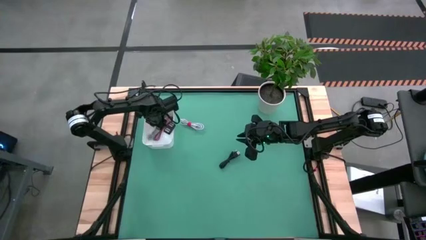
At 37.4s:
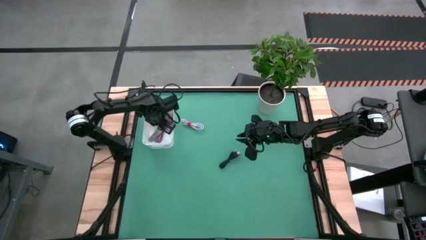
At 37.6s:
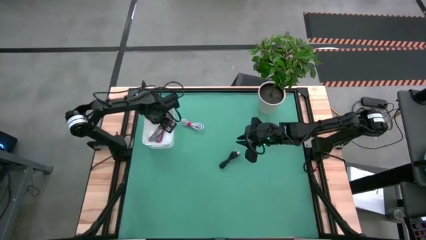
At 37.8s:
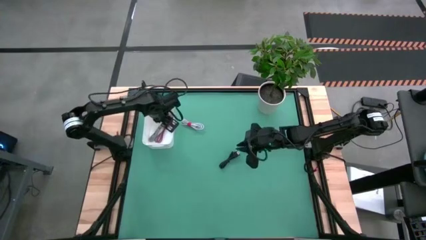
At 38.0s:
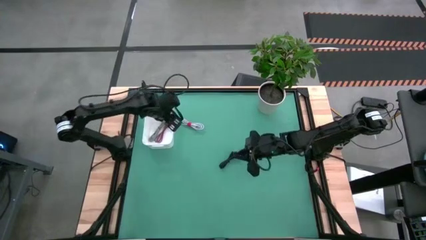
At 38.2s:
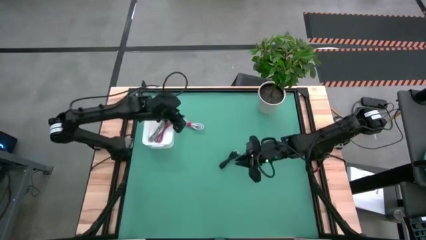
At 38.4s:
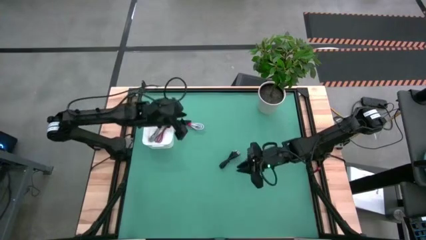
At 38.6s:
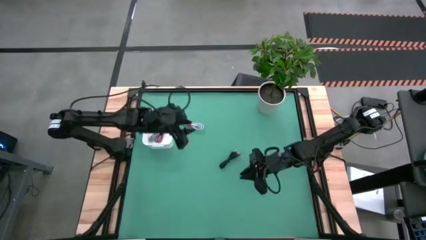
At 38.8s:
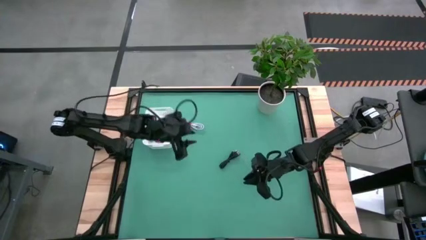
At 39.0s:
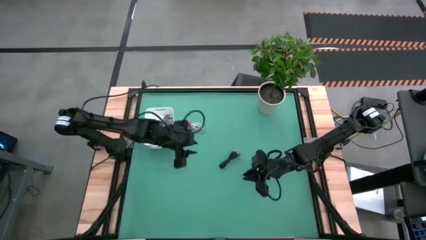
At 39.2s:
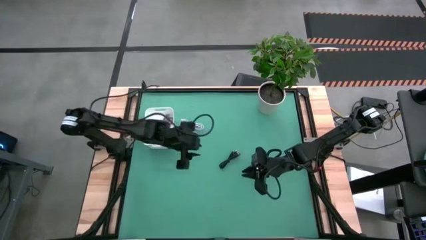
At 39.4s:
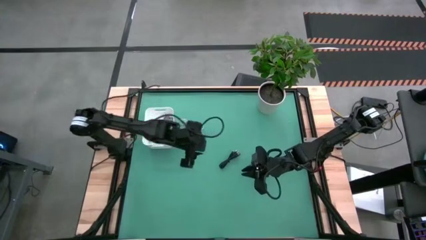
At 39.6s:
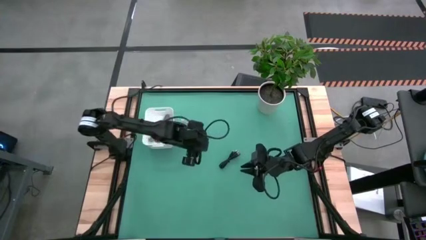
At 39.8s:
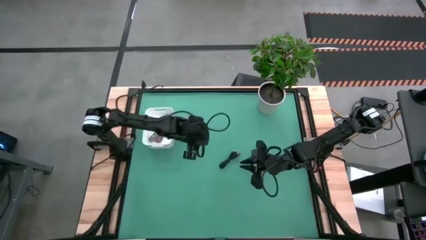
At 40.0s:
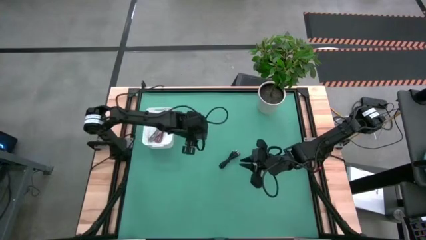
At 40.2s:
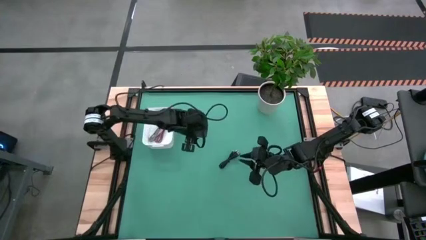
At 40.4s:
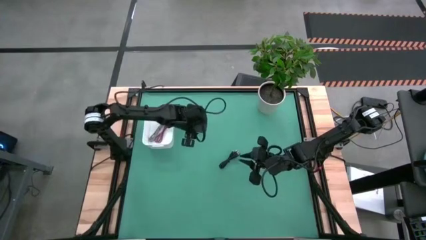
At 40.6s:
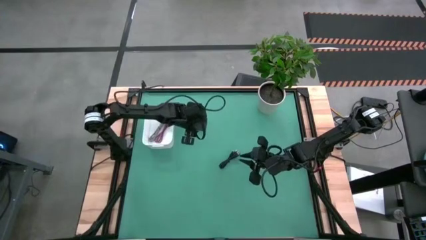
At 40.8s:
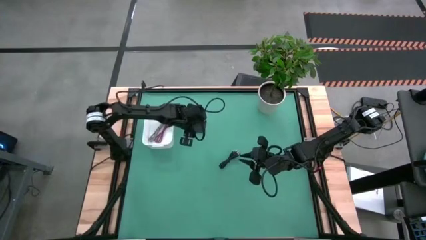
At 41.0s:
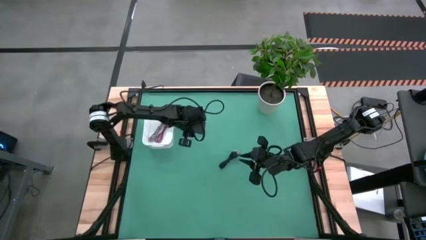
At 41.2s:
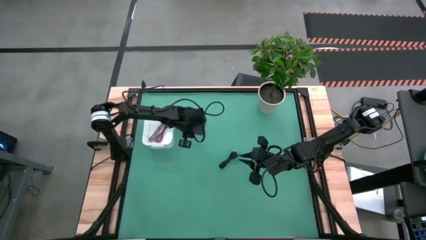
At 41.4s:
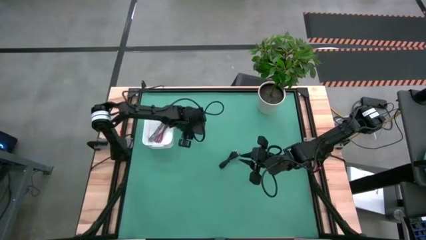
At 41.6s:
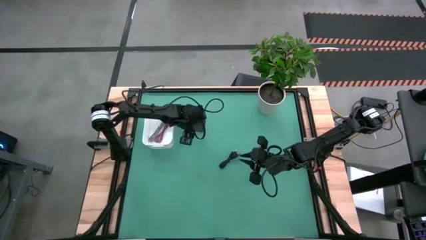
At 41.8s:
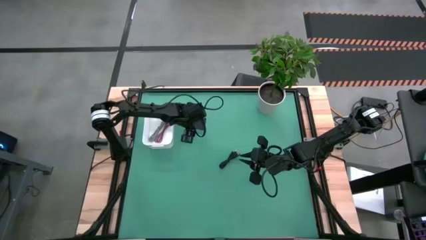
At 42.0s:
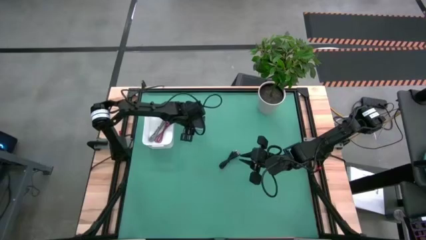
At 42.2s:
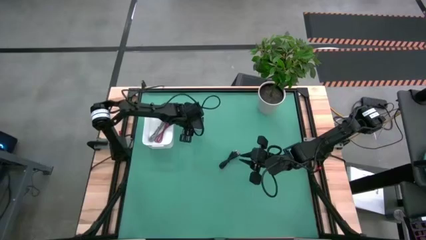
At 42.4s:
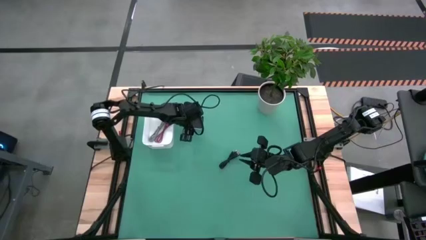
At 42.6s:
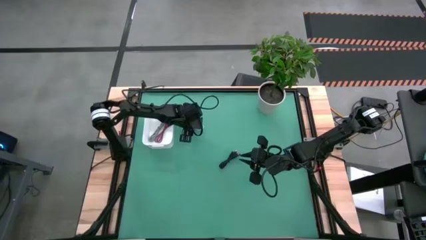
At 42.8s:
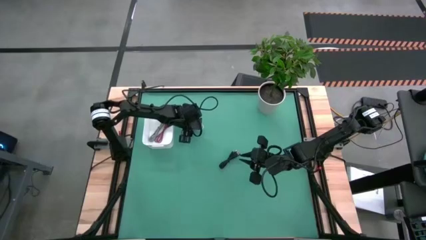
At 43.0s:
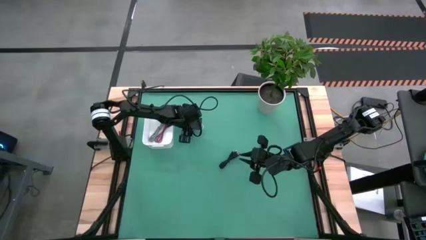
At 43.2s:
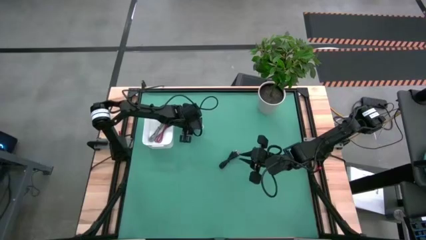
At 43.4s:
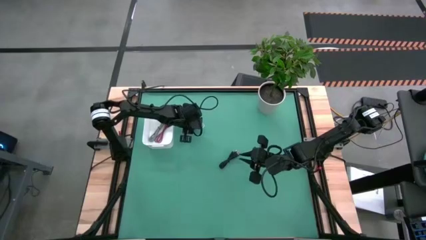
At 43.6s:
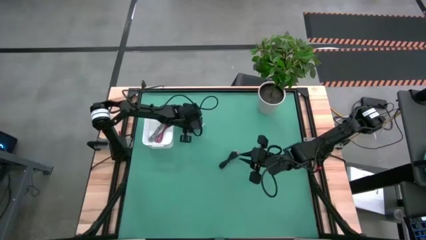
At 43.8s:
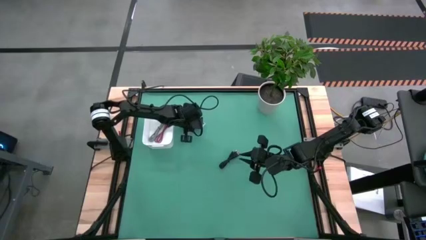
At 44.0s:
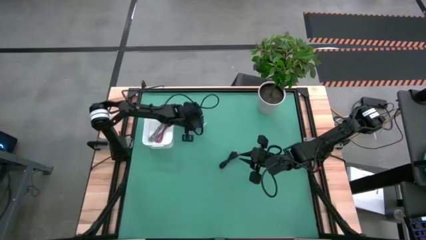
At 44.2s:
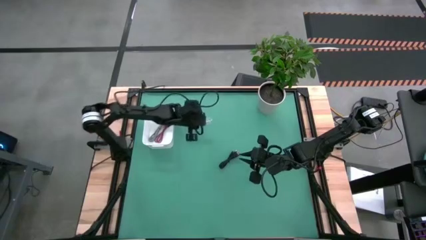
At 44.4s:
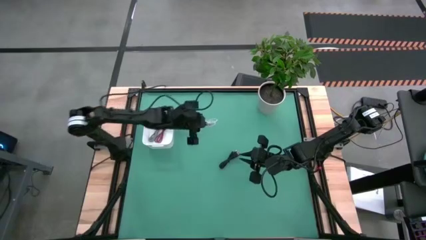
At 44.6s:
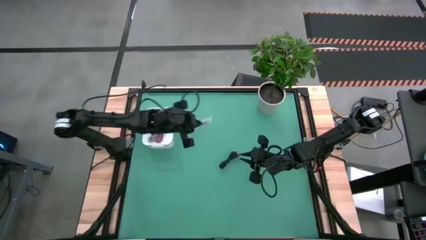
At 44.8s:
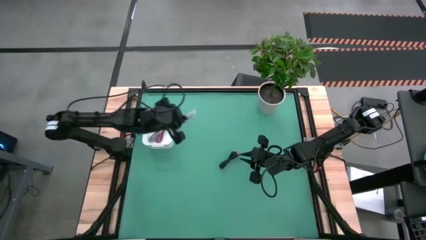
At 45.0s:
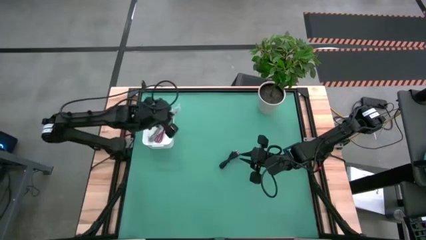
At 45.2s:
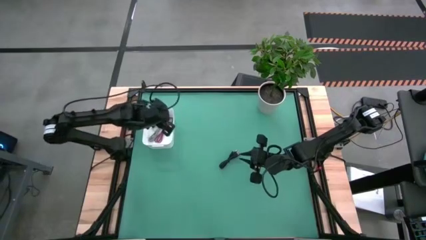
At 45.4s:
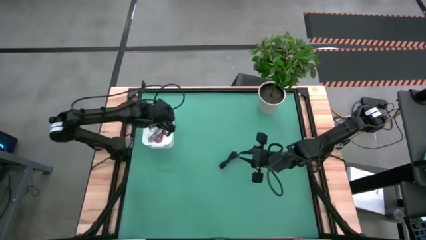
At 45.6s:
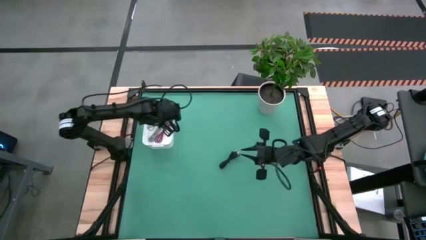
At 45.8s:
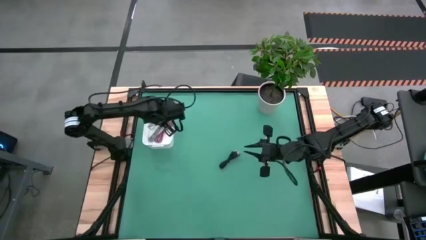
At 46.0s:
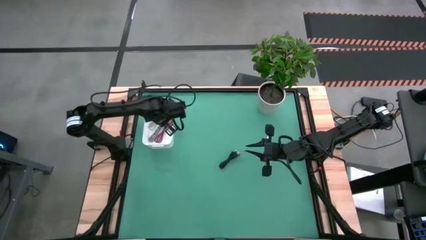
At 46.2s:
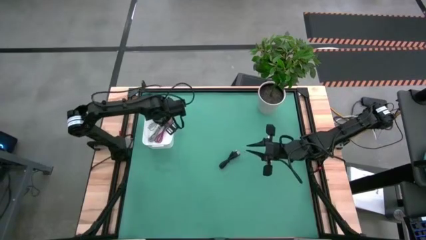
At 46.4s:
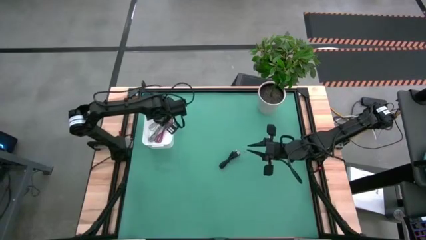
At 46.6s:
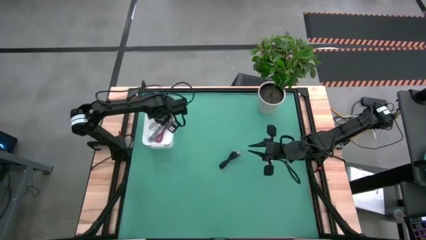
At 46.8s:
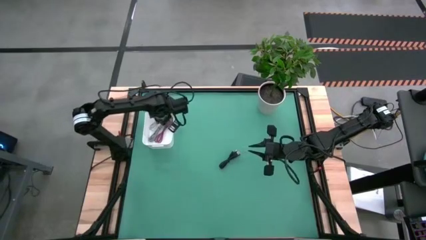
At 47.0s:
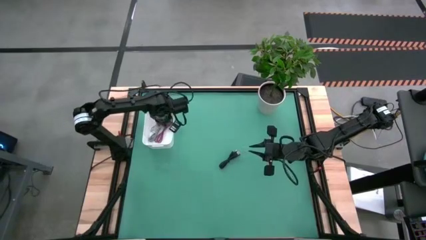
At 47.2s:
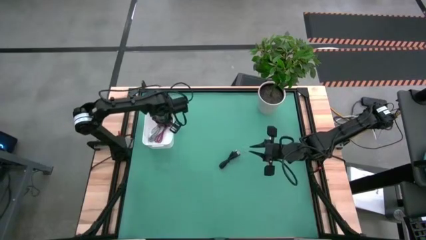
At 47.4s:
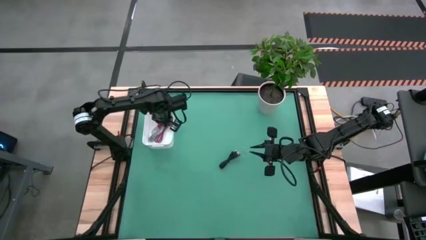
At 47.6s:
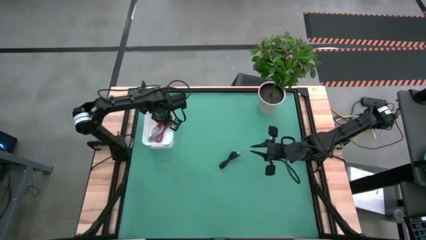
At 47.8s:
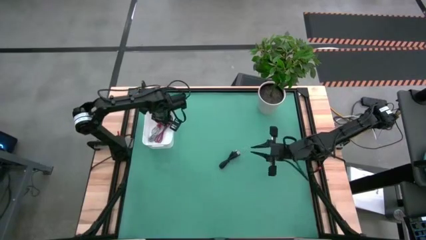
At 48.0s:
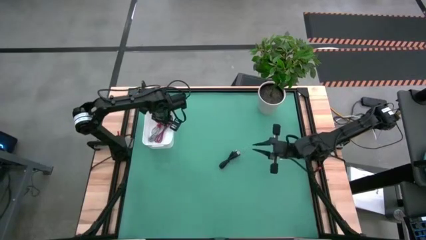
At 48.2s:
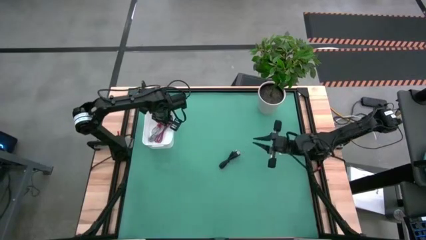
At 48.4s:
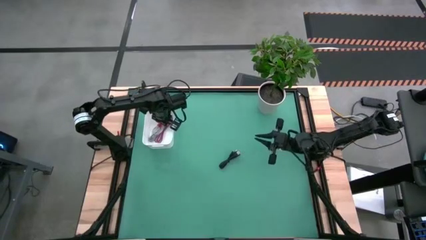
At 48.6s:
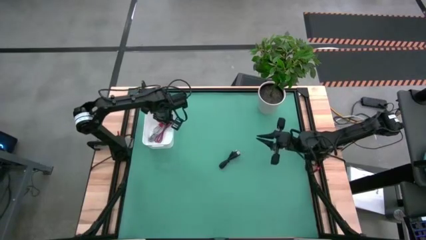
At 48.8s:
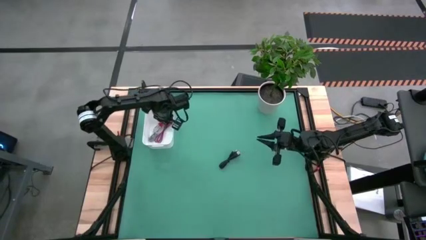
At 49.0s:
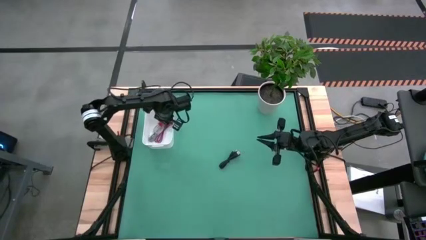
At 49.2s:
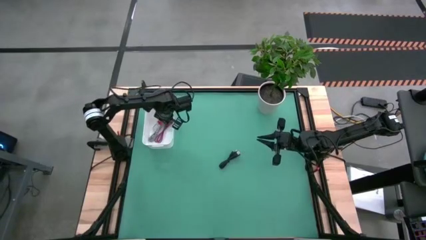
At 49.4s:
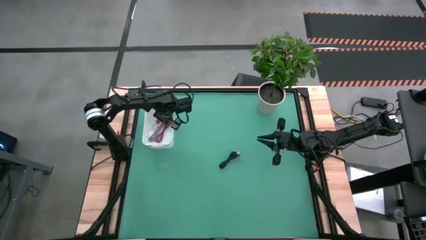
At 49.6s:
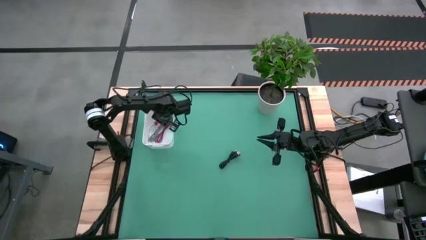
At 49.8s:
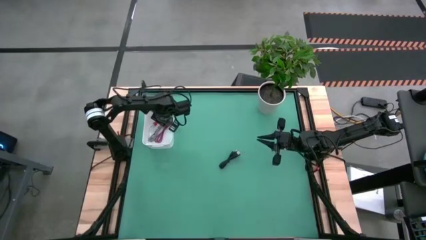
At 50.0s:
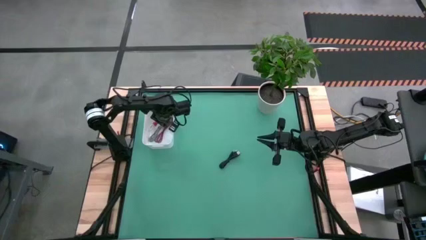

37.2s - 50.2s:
Task: Pick and place USB-C Cables
Put the white charger cable into the white bin
